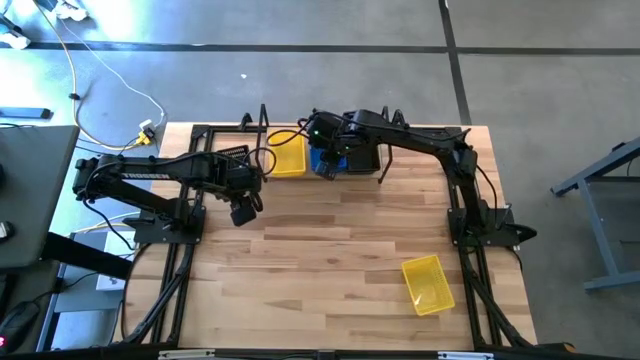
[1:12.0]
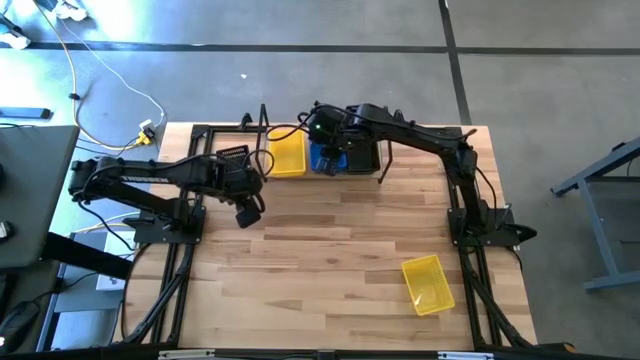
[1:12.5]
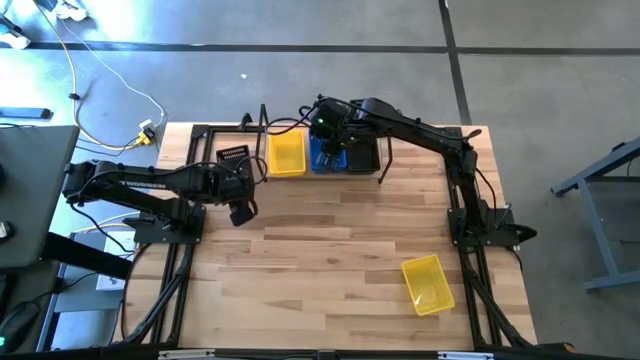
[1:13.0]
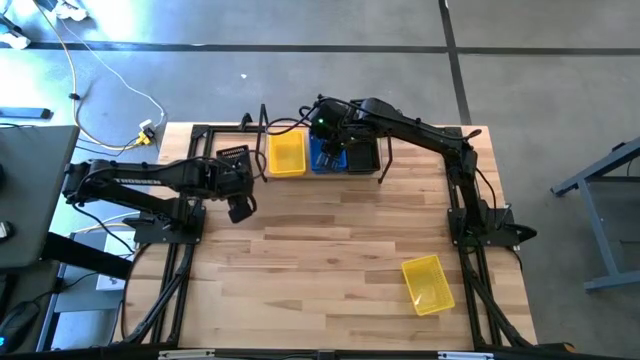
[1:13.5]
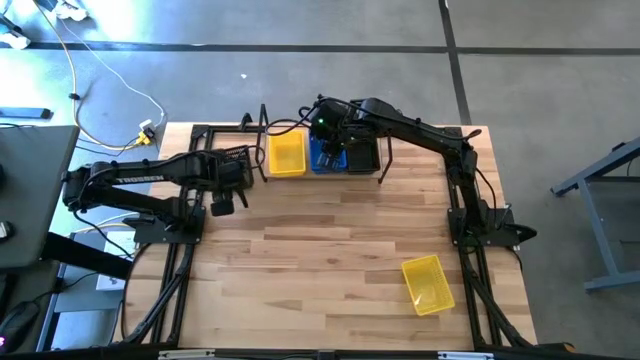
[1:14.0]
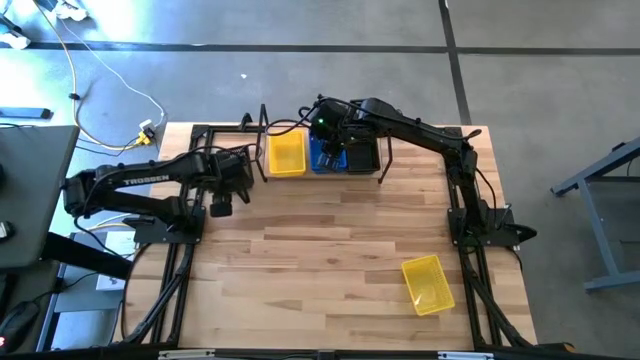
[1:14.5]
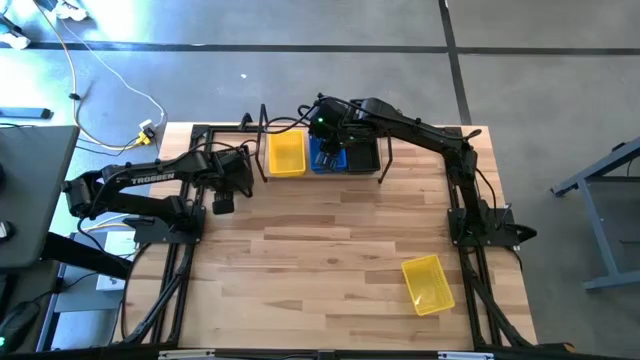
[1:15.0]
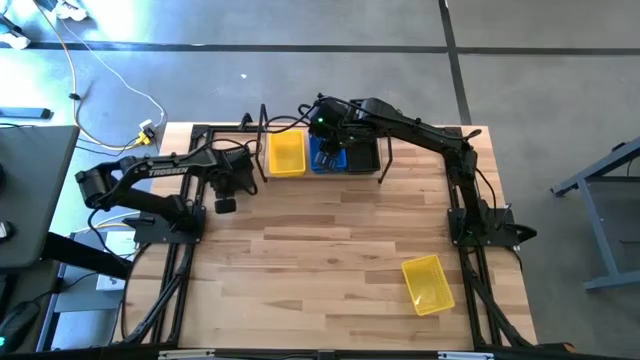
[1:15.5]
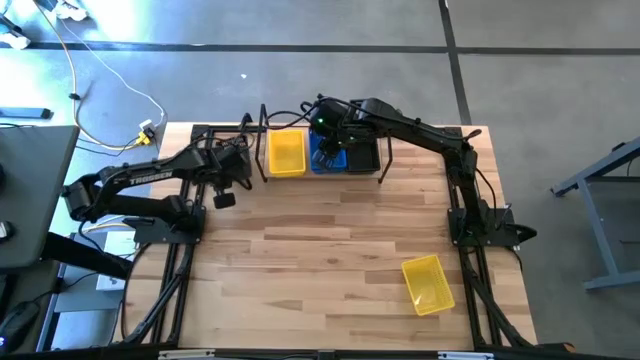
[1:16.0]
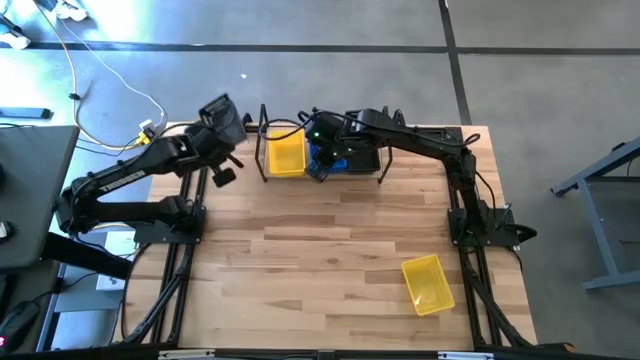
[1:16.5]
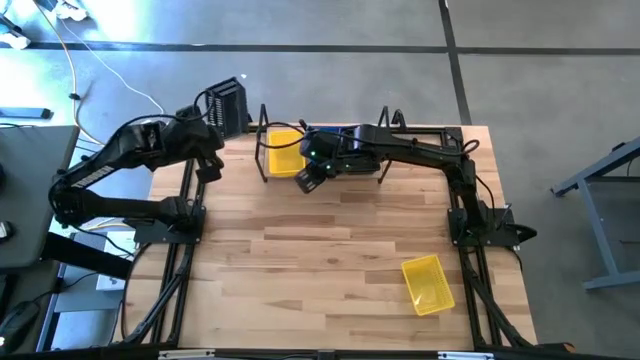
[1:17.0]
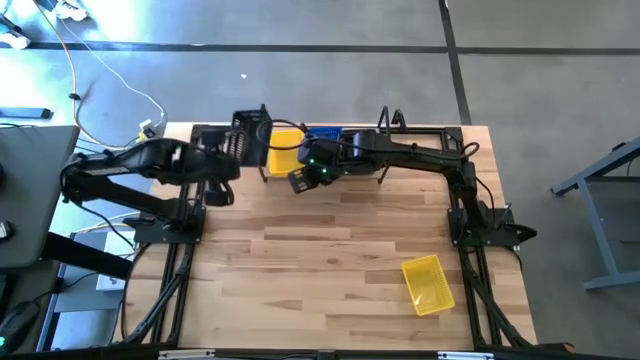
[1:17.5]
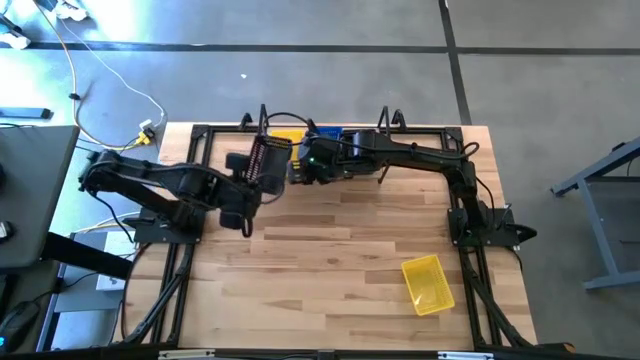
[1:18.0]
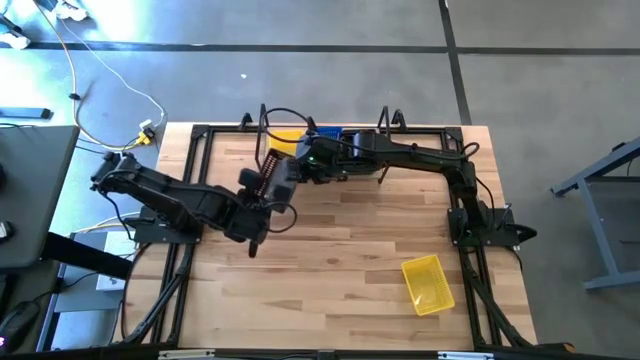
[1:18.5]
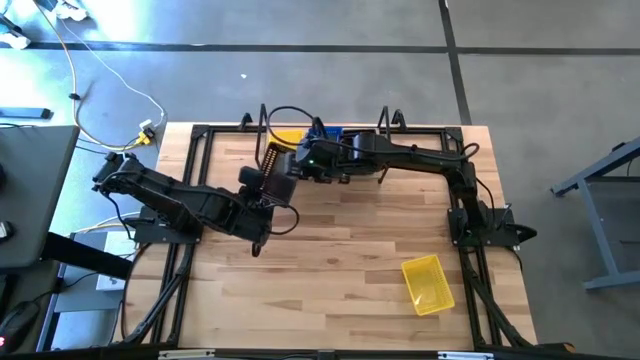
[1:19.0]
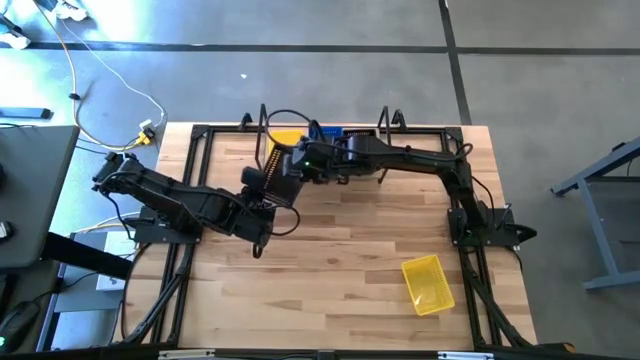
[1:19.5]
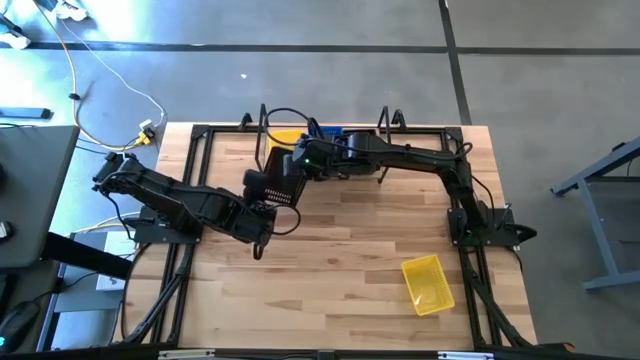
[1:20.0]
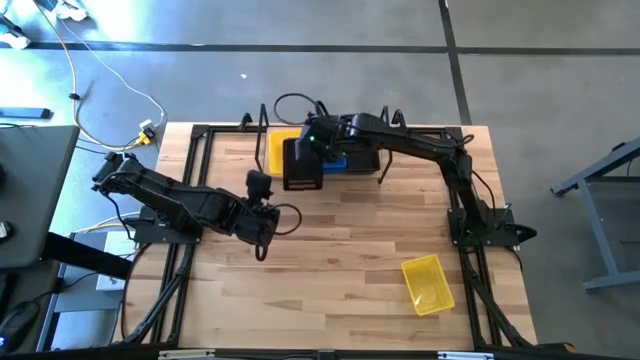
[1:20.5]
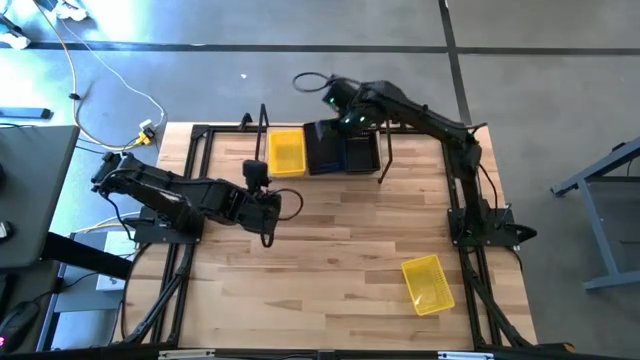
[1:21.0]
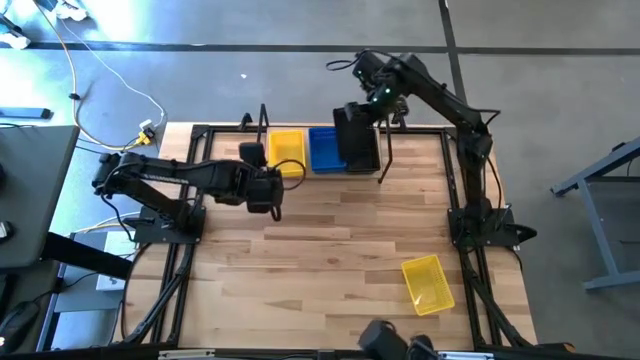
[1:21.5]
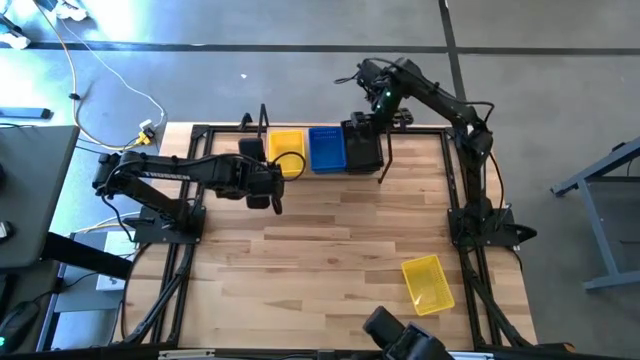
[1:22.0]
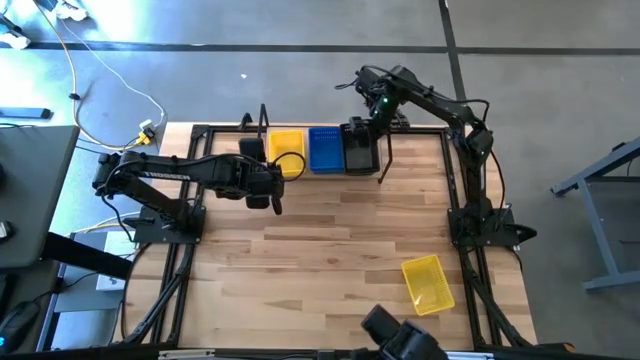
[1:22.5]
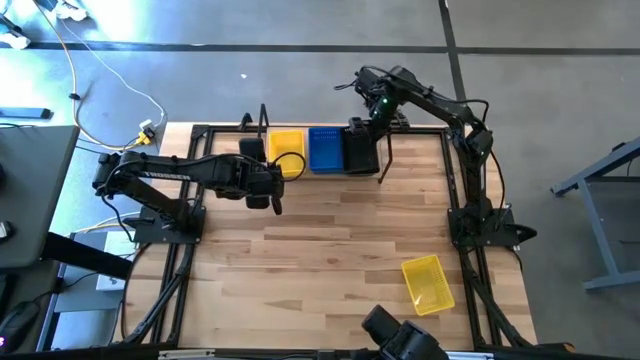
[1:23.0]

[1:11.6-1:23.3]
Task: Stack baskets on shelf by color
Stack the black basket on top of the black baskets on the shelf

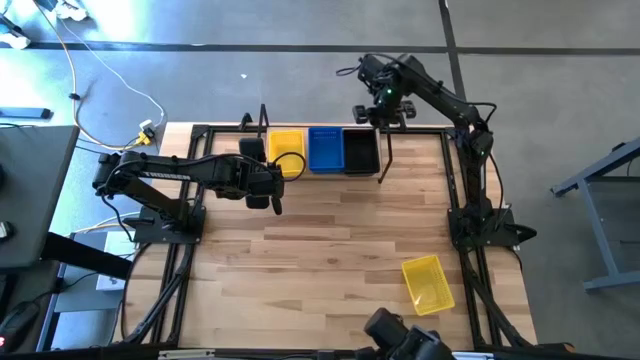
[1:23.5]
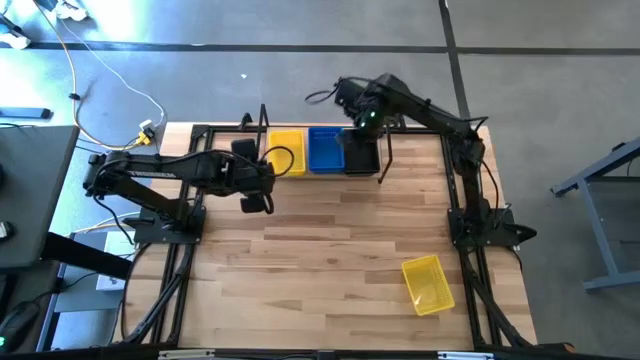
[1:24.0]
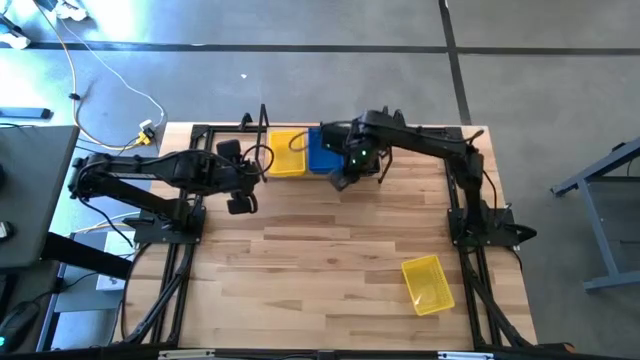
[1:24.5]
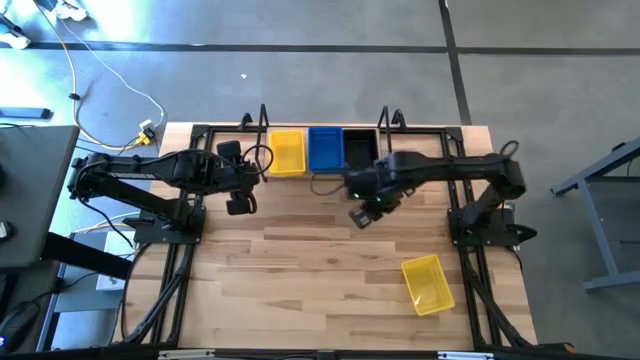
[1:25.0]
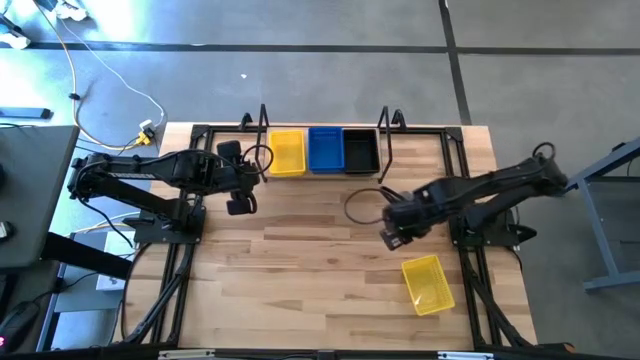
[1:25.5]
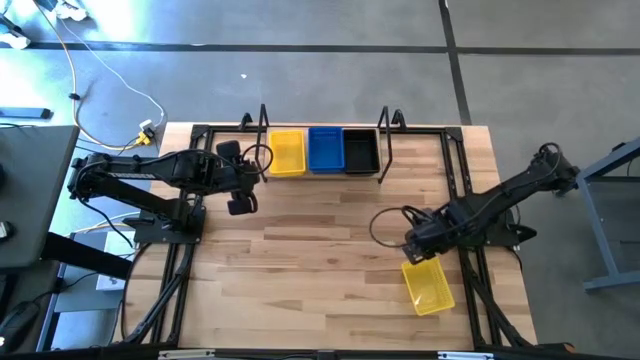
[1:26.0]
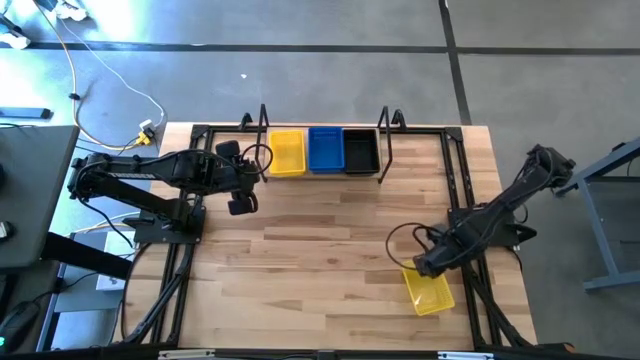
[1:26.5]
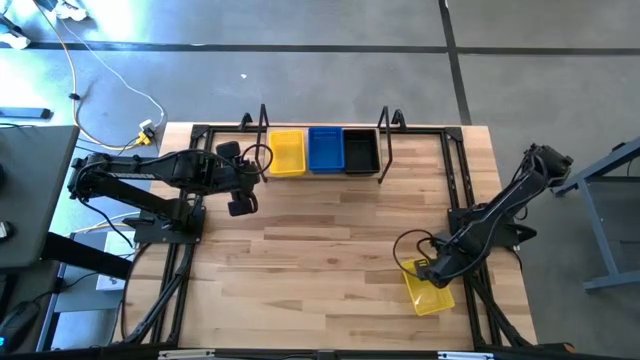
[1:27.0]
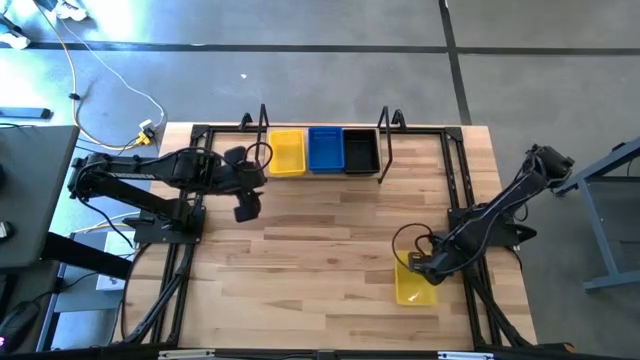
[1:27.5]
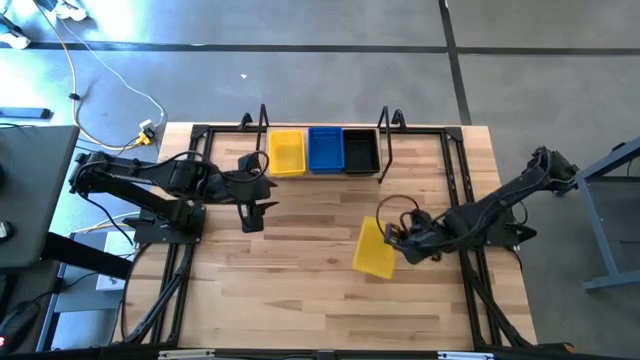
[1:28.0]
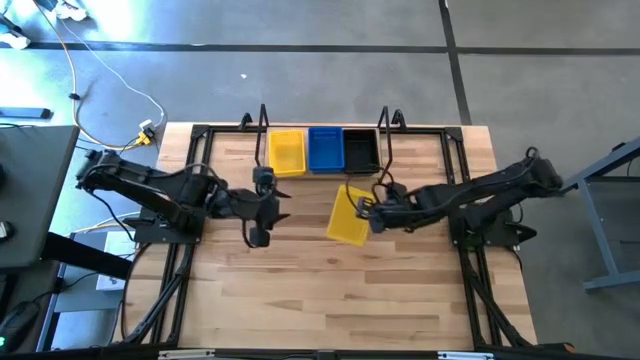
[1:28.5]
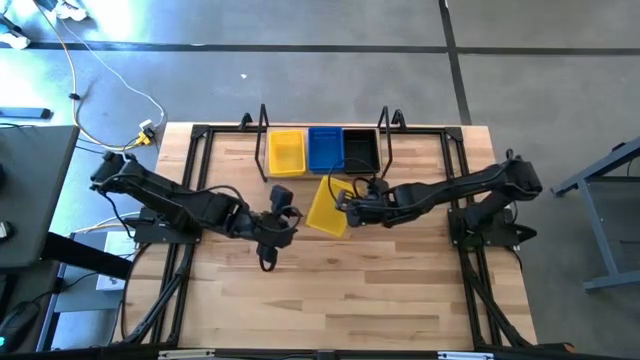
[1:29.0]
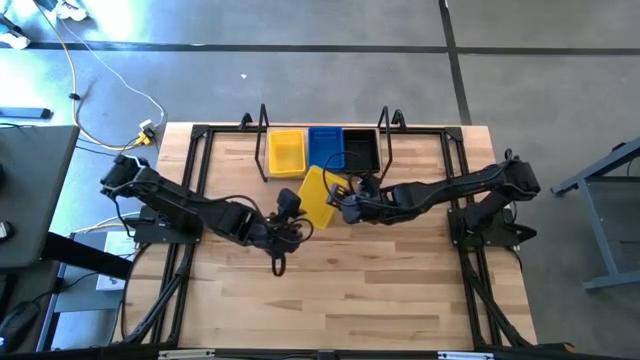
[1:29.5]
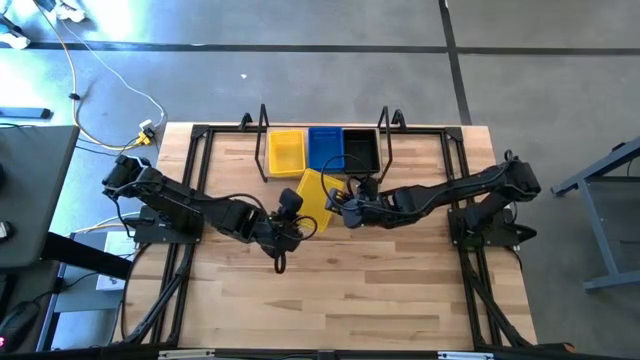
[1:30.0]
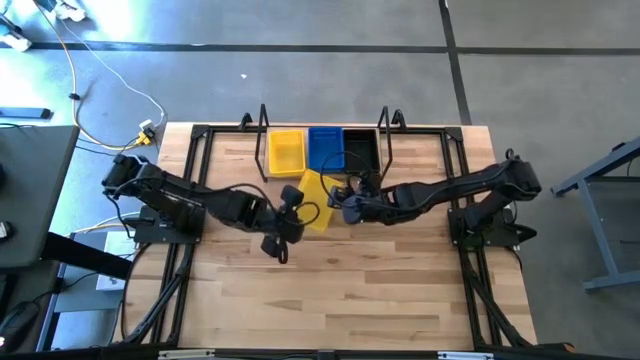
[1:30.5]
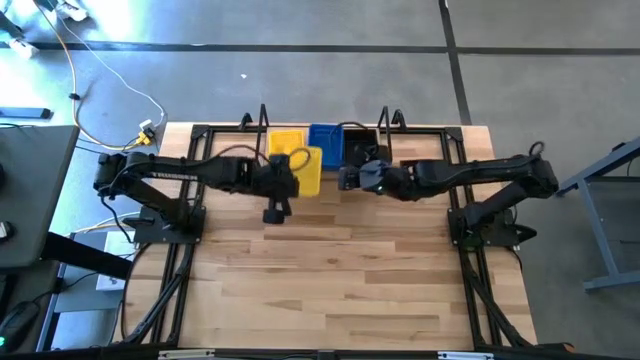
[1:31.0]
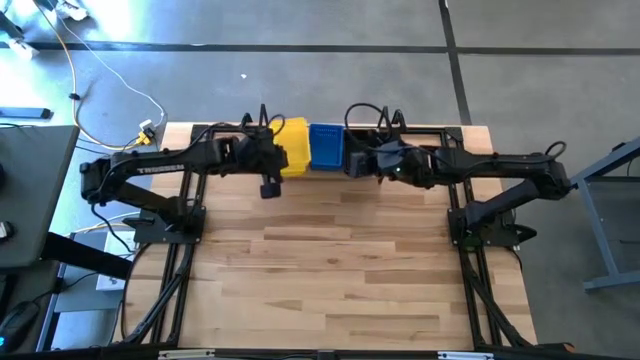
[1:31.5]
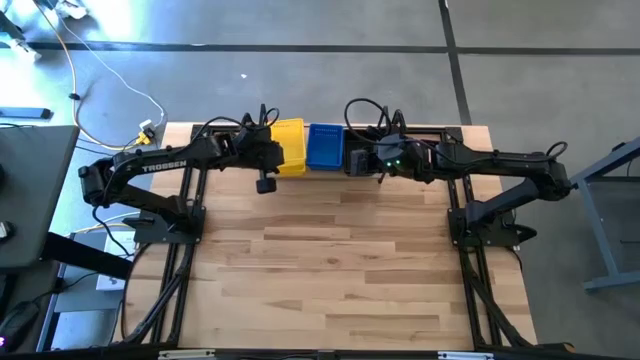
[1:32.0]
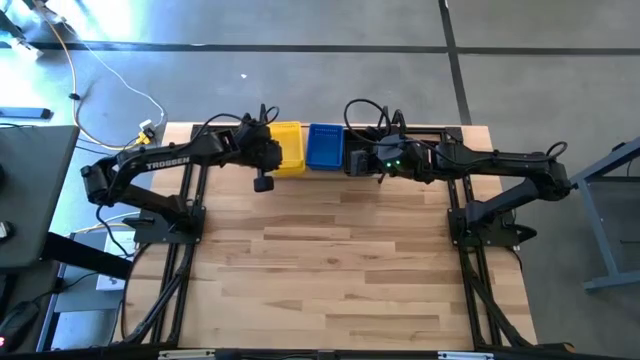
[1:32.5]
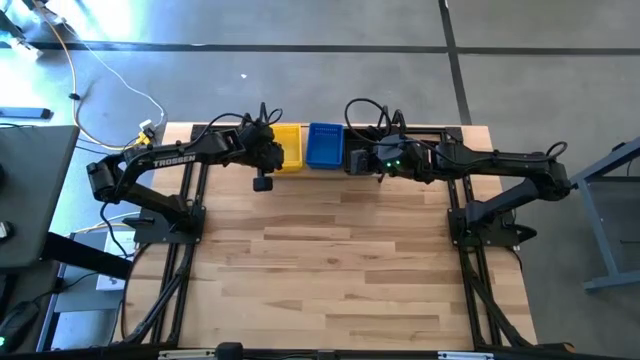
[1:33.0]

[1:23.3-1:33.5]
Stack the yellow basket on top of the yellow baskets on the shelf
